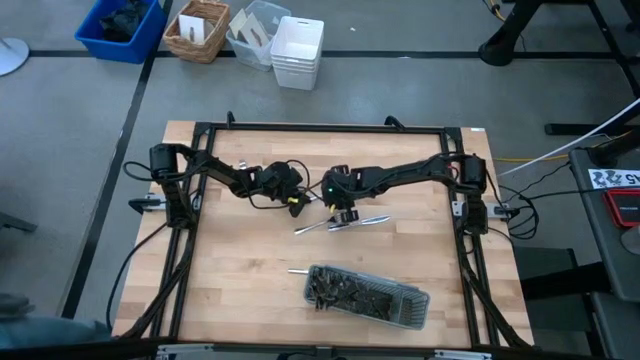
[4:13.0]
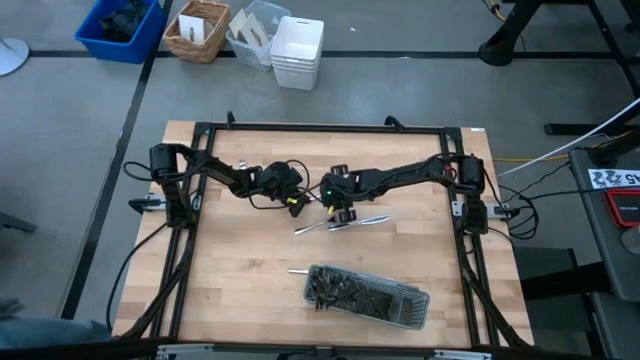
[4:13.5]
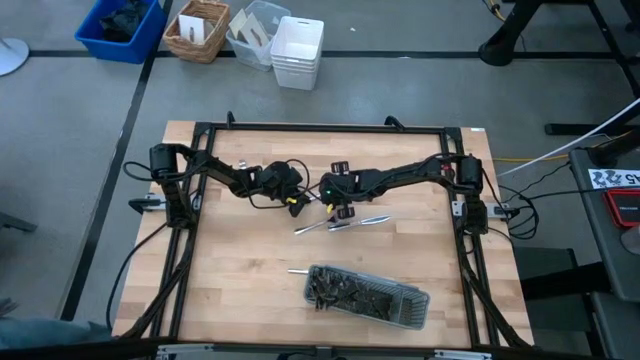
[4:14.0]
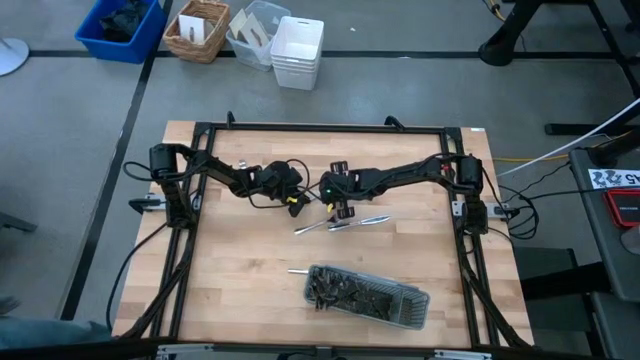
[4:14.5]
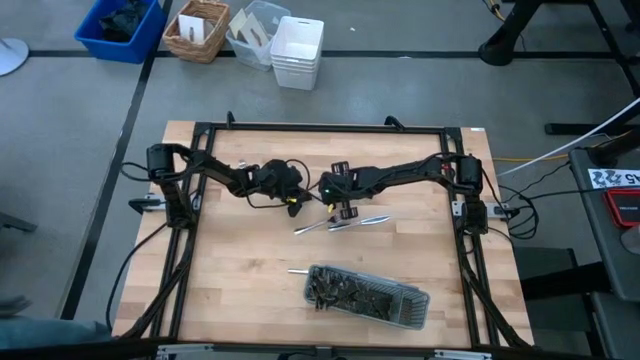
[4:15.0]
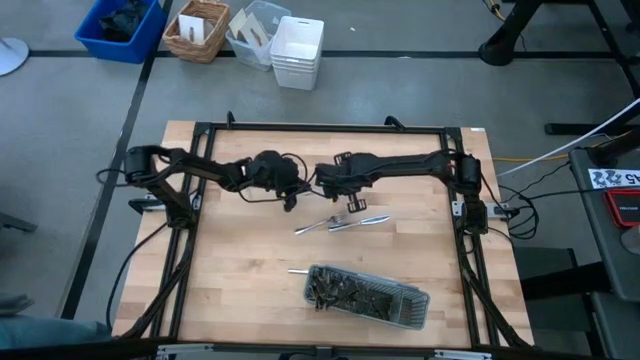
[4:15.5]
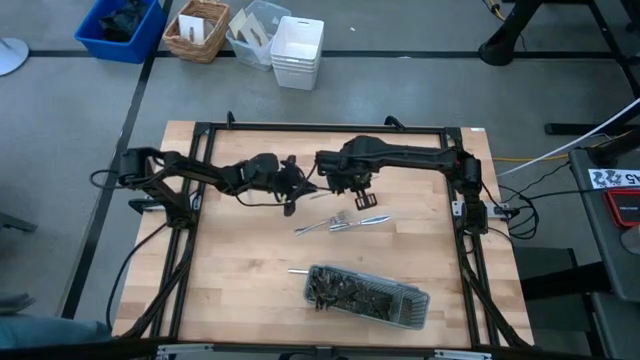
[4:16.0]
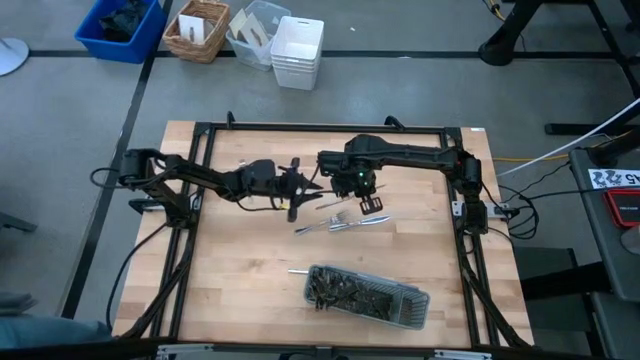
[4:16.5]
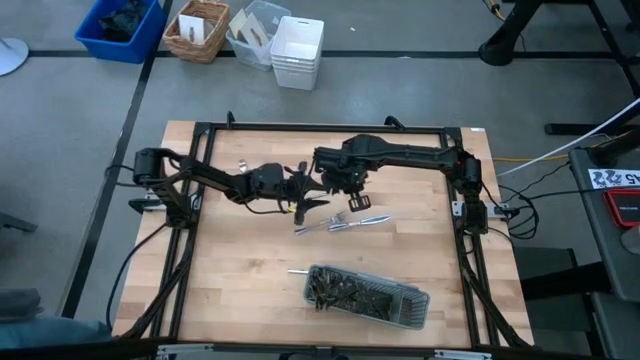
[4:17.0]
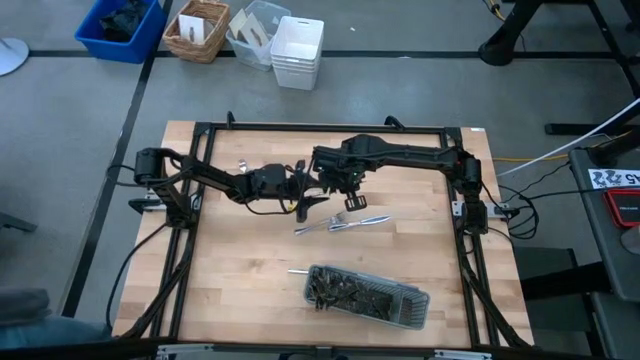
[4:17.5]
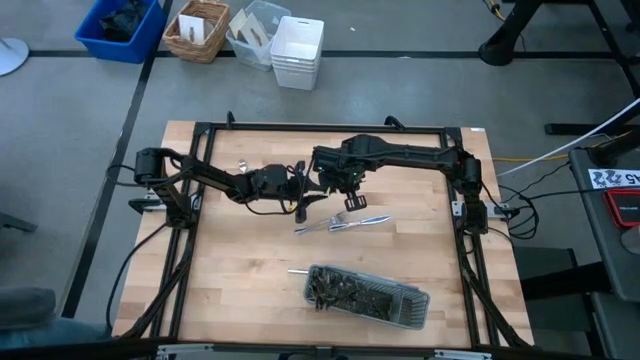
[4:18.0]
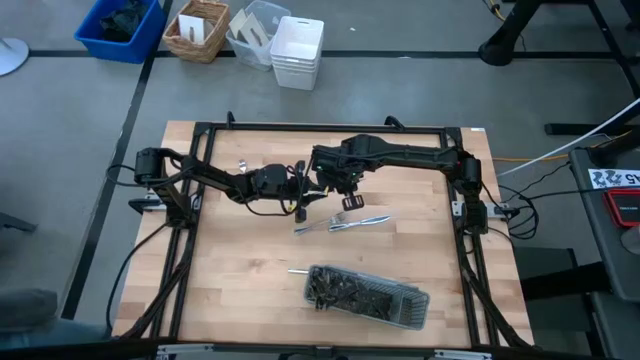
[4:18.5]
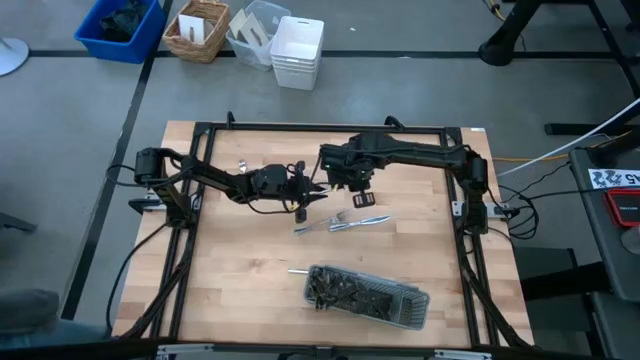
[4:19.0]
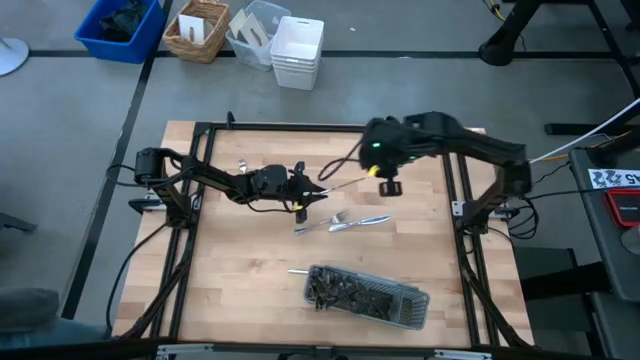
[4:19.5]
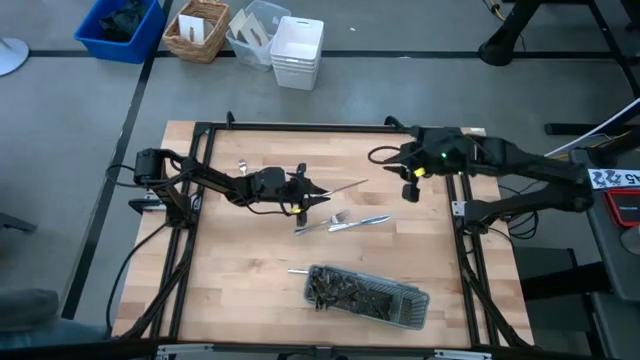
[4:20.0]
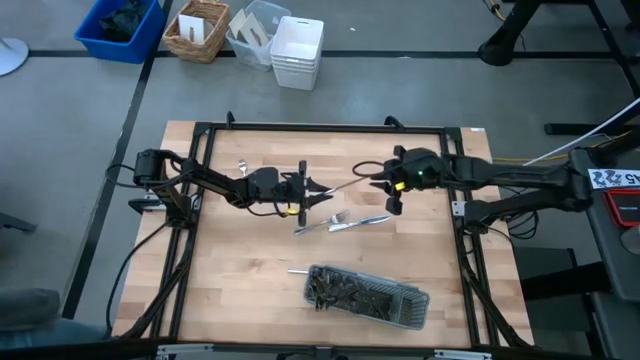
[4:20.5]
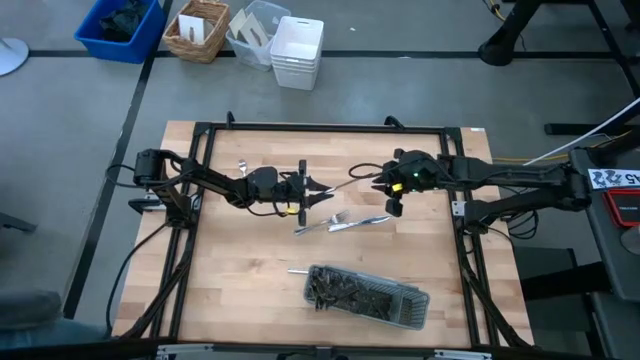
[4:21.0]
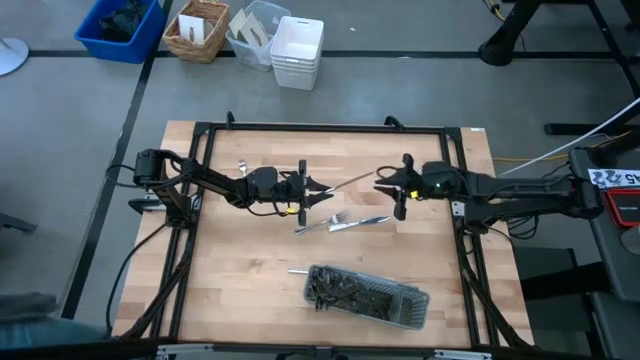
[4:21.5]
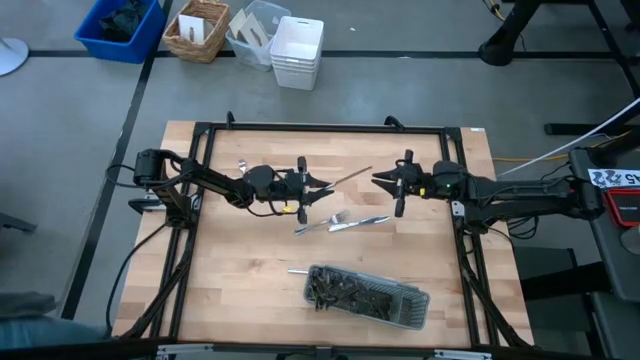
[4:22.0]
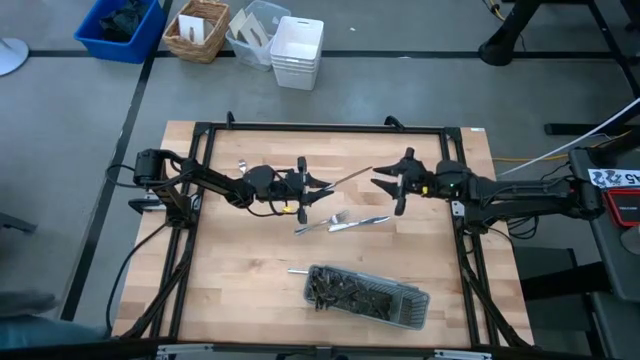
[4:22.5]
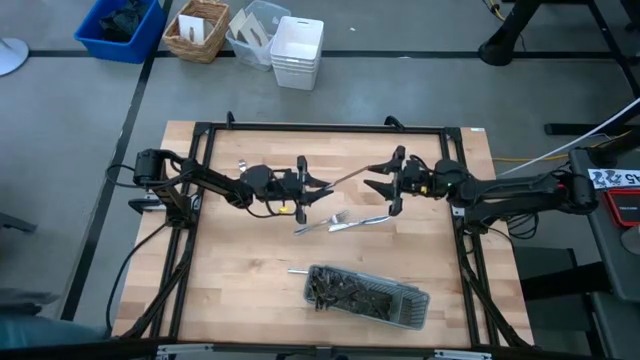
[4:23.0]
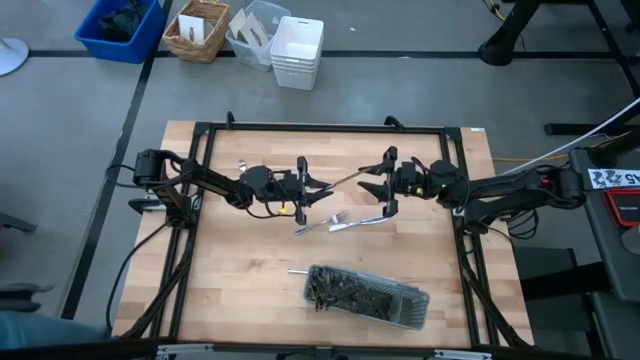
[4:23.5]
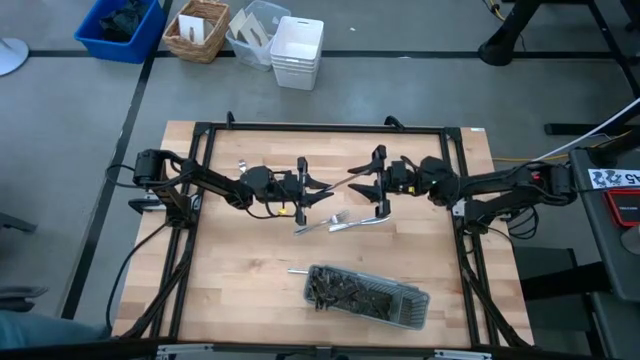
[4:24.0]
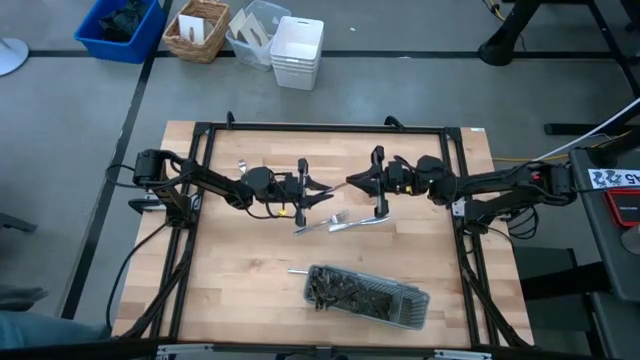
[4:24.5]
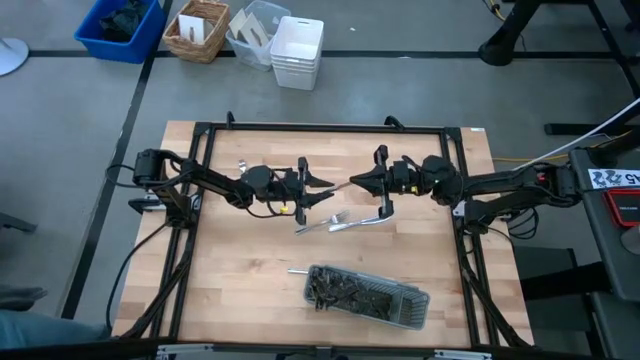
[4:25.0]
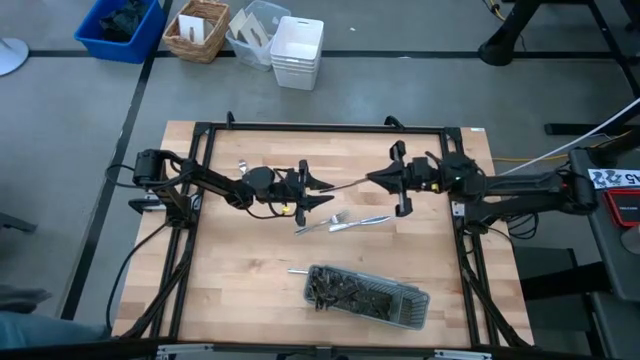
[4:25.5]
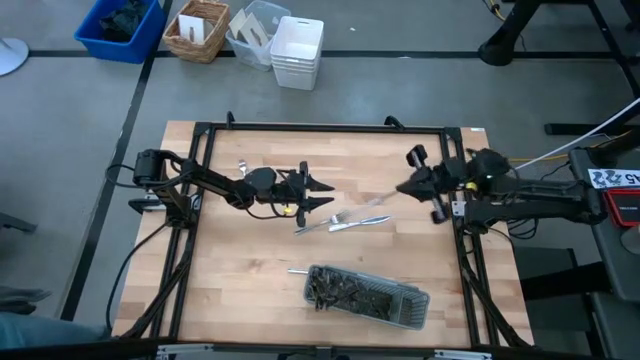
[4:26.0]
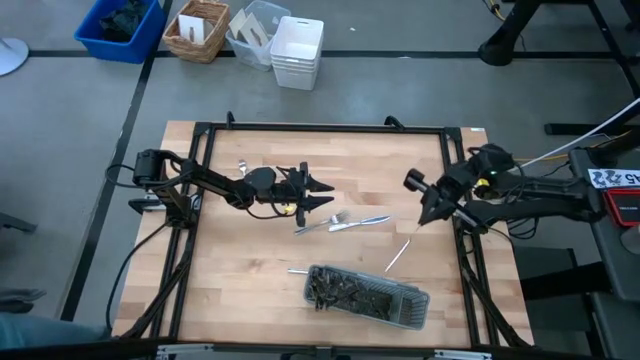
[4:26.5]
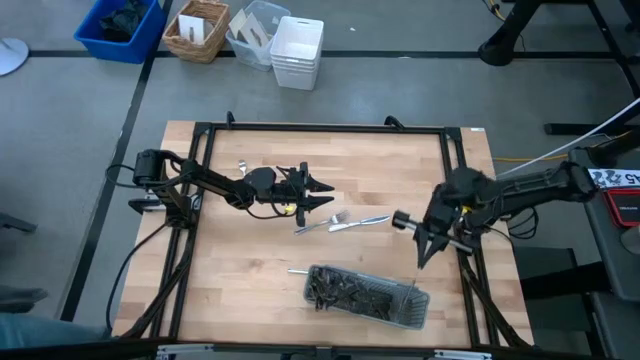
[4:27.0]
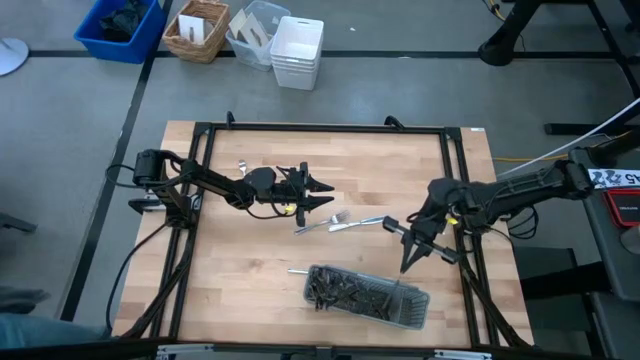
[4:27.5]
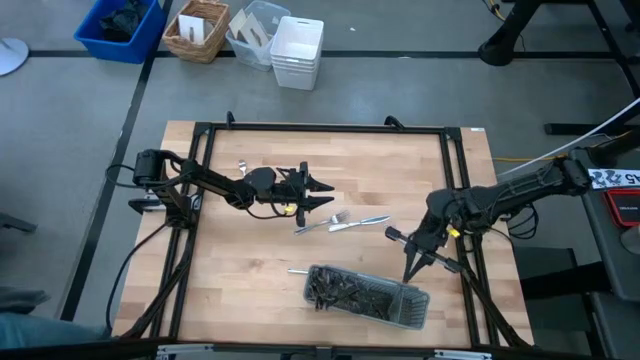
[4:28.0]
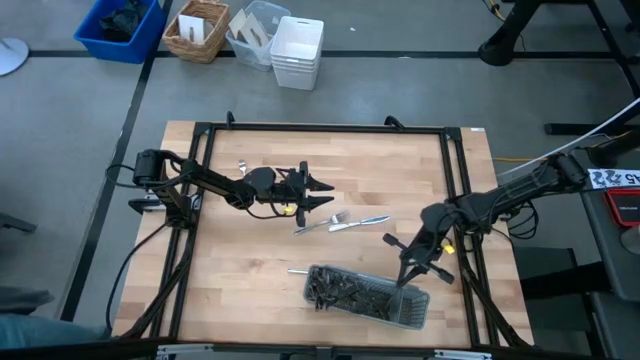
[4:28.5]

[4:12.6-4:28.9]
Task: Sort silverware
Put the knife into the gray silverware rack

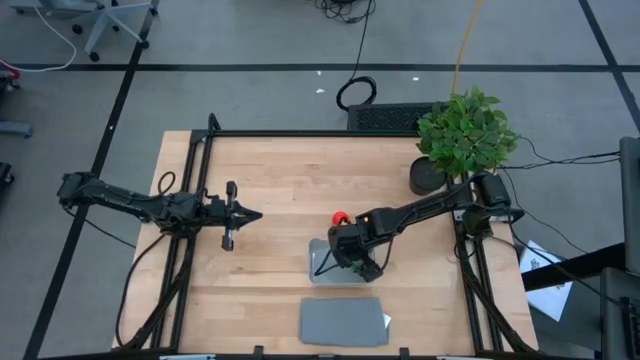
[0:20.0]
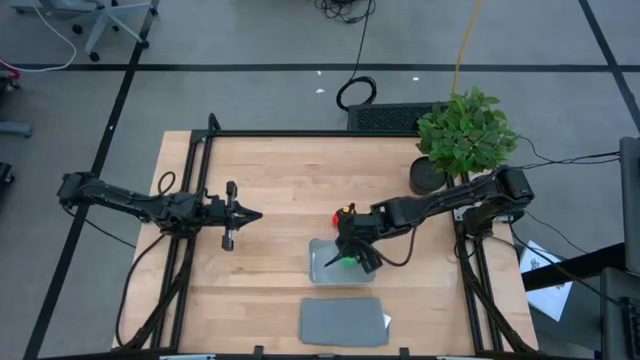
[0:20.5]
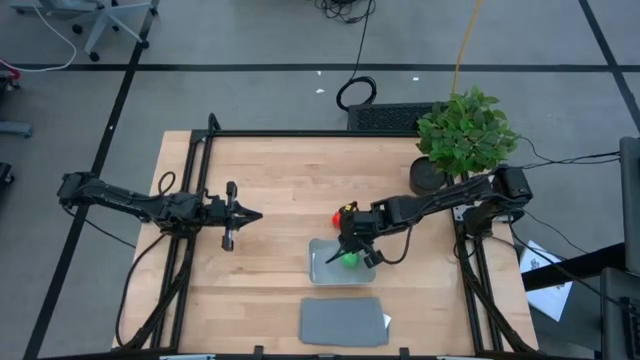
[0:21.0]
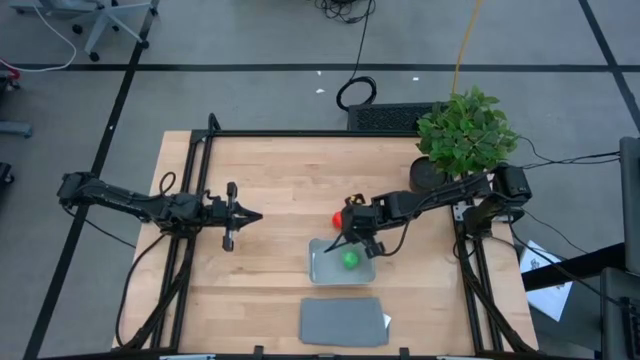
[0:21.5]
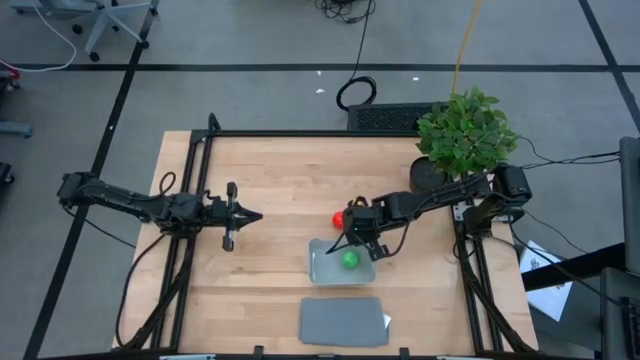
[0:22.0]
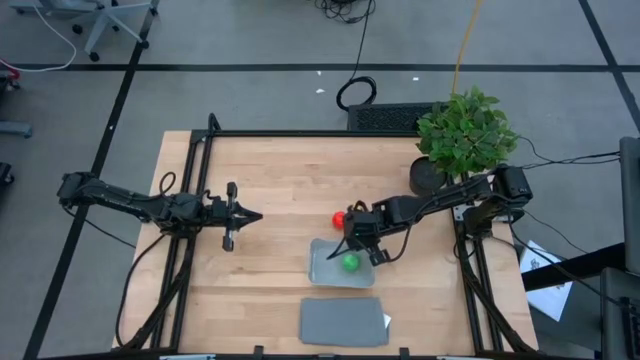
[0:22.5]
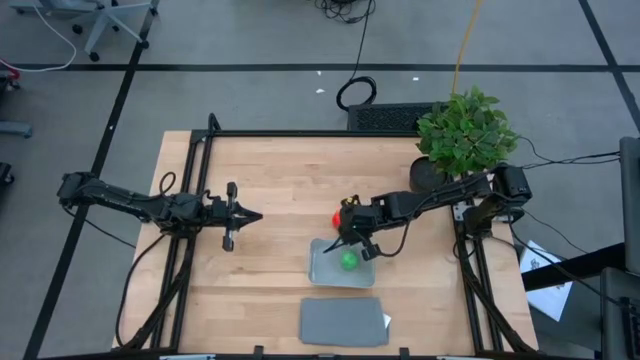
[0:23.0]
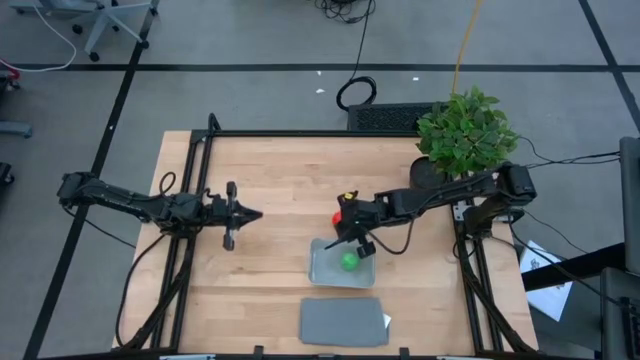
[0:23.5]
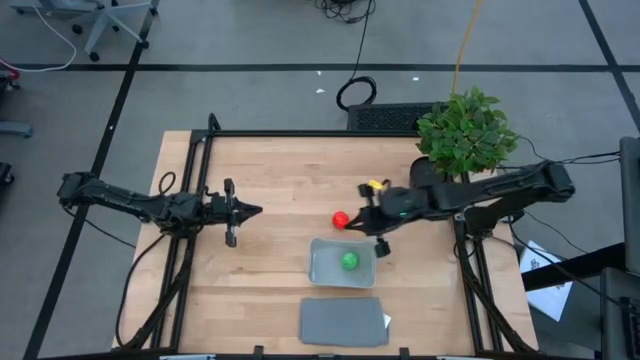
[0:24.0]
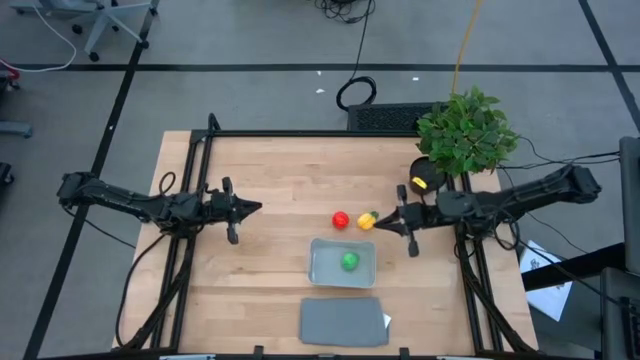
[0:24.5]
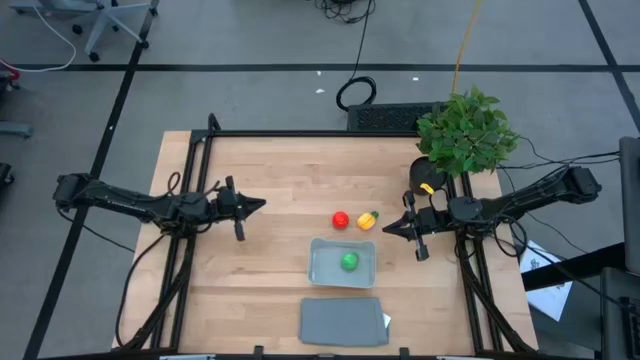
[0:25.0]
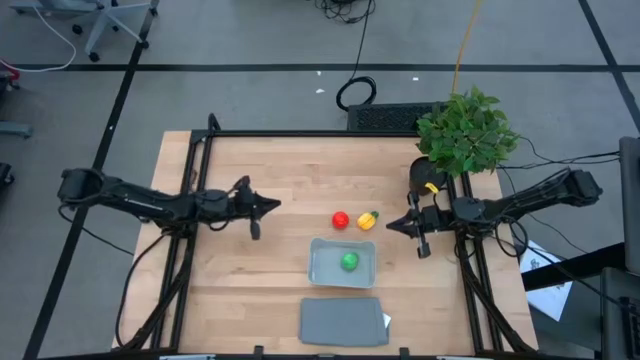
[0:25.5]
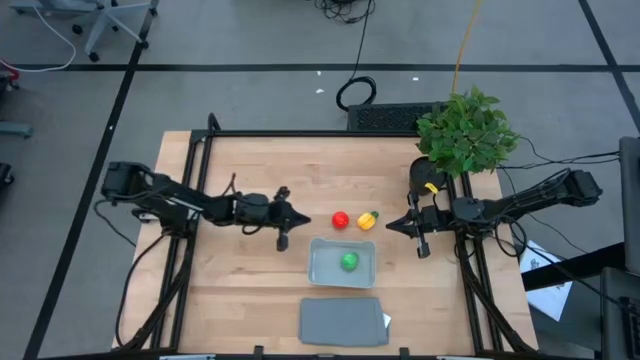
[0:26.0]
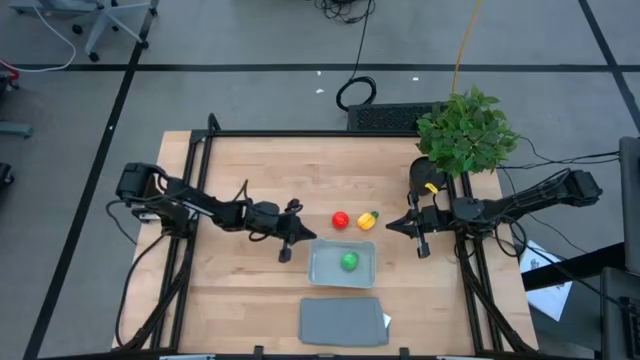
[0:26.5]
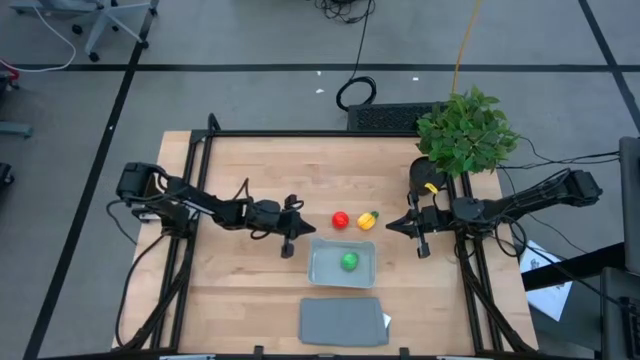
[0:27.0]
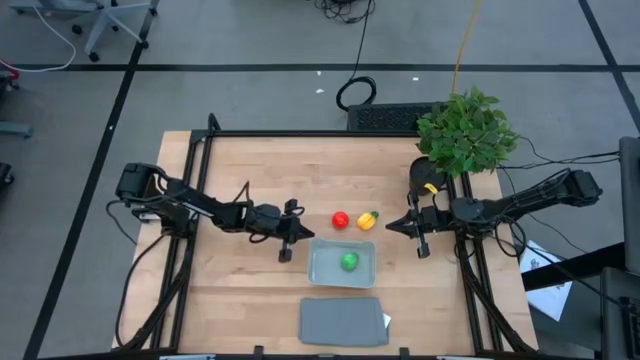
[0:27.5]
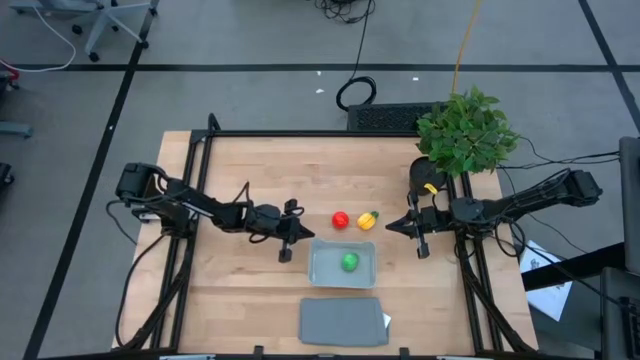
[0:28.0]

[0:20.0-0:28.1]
Task: Pick and placing Produce into tupperware
Adjust the gray bin on the table
